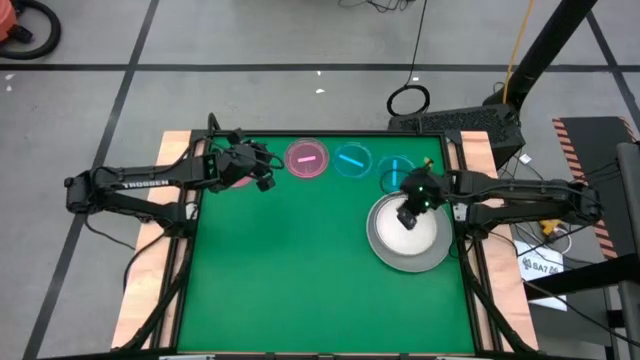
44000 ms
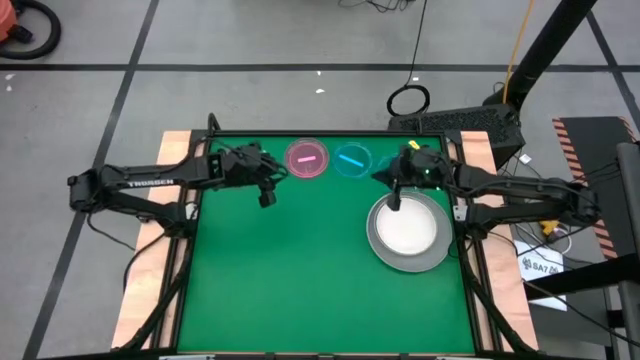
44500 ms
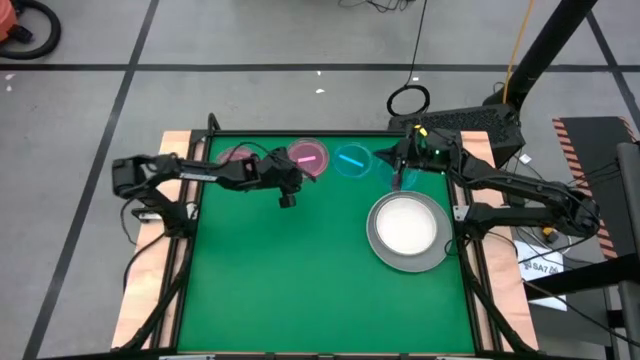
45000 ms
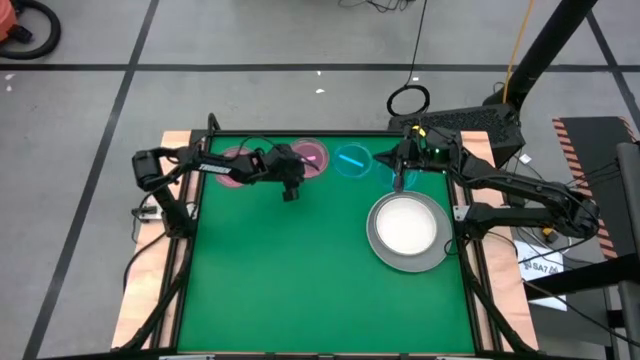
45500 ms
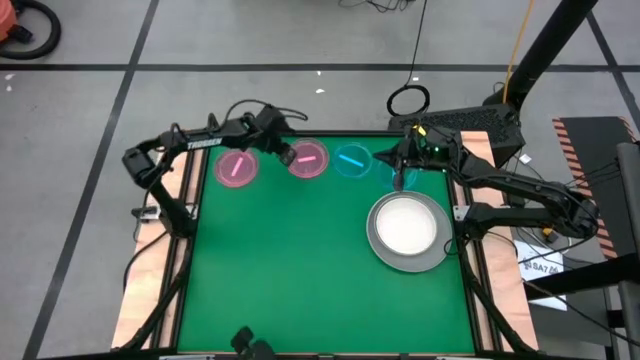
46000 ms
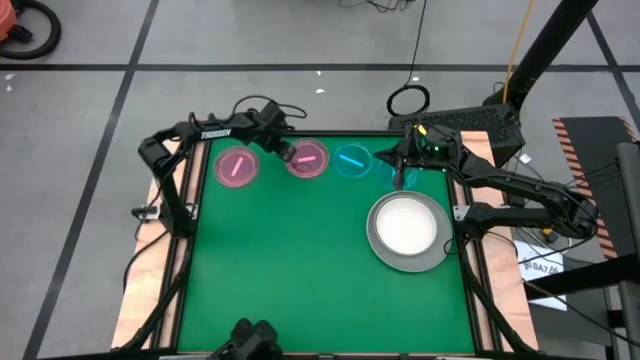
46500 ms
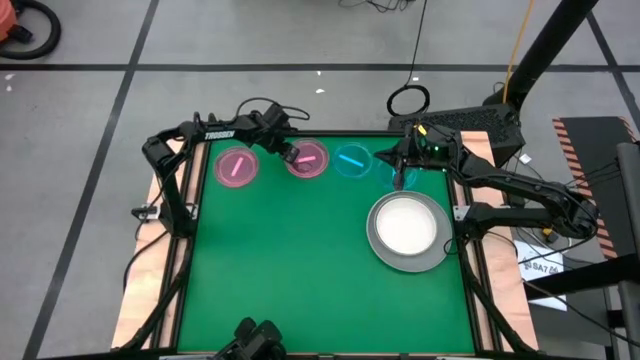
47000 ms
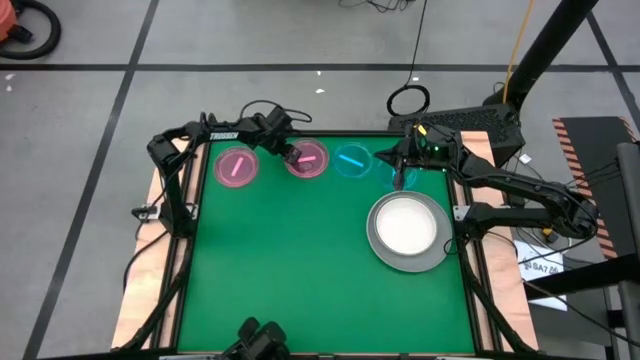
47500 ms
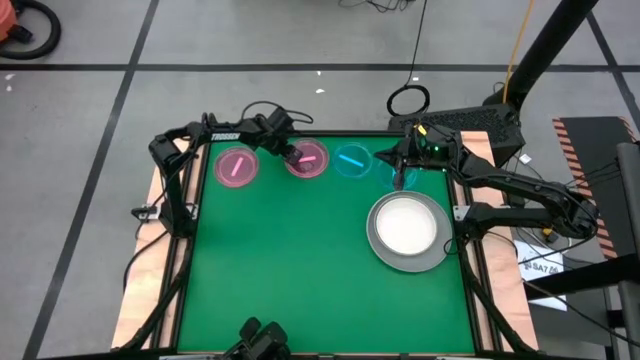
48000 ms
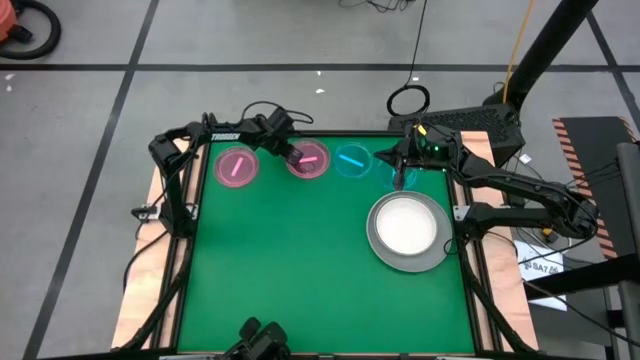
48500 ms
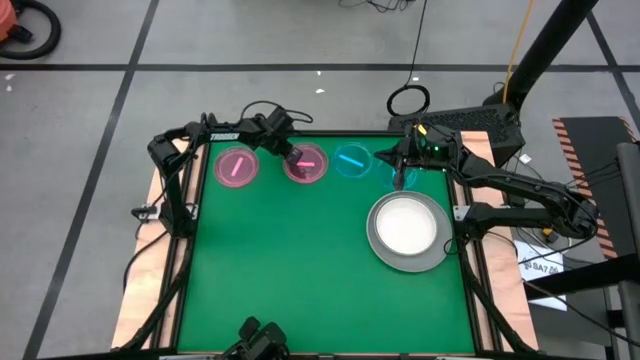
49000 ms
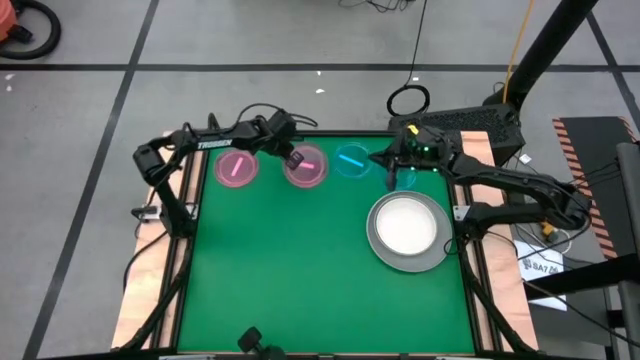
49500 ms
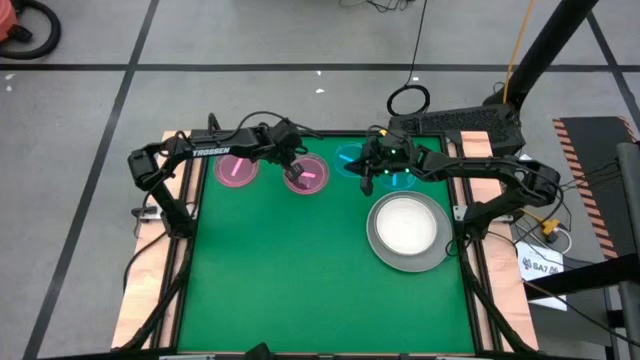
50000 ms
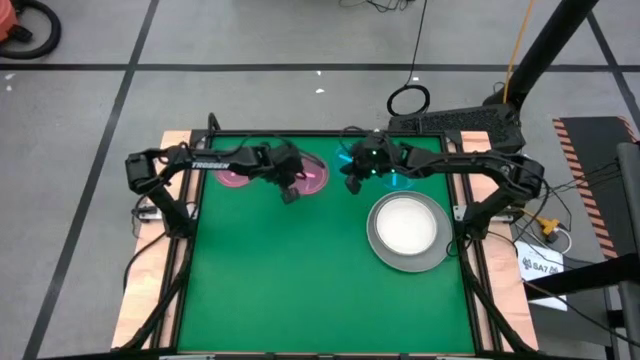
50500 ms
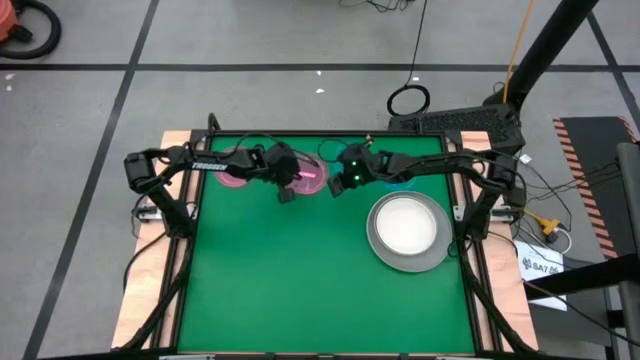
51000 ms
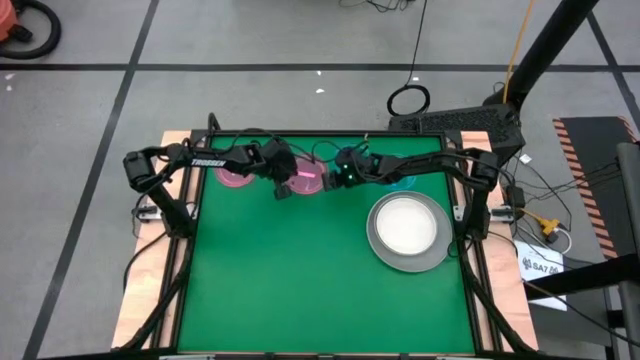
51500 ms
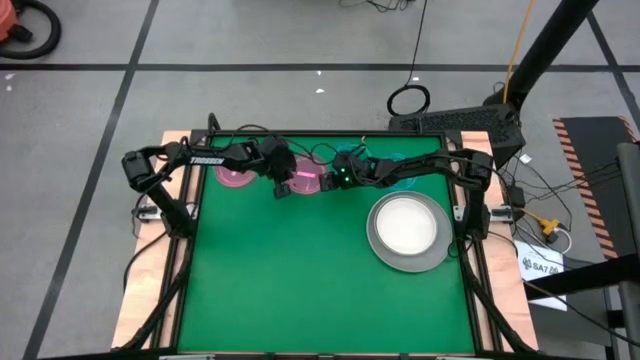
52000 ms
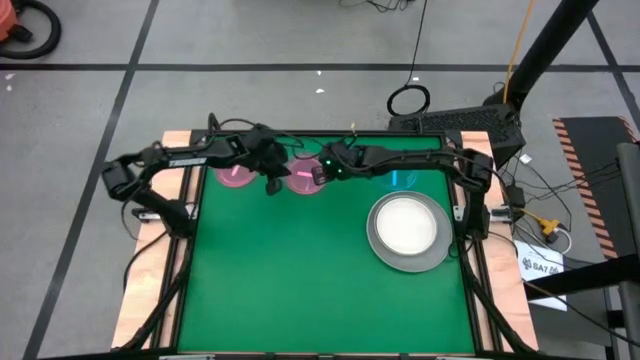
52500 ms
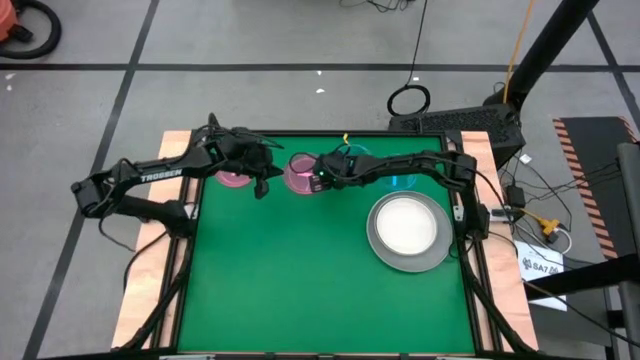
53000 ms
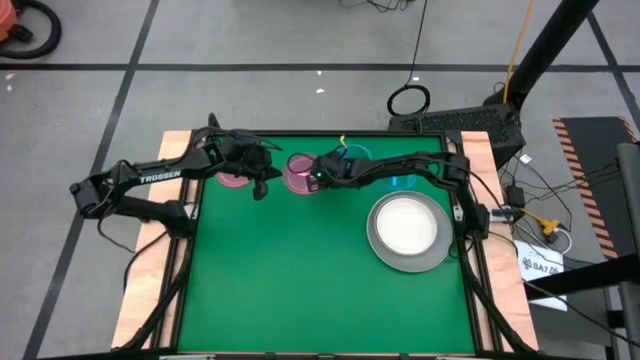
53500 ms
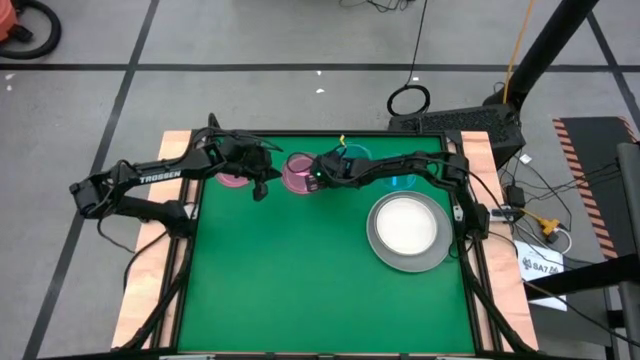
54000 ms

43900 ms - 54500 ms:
Task: Stack plastic plates
Stack the right pink plate on top of the white plate

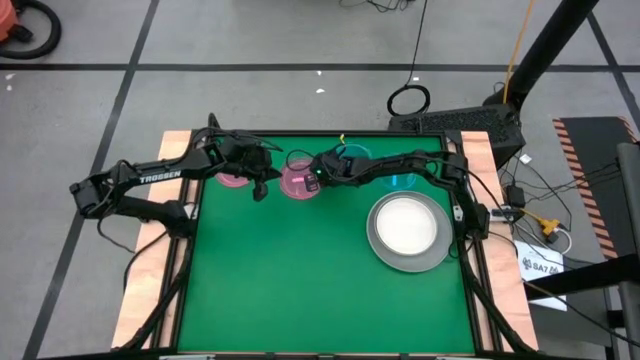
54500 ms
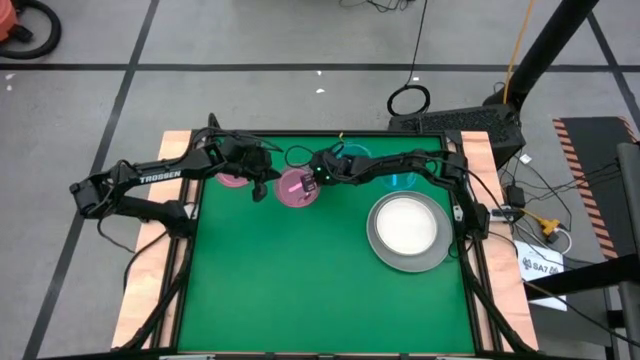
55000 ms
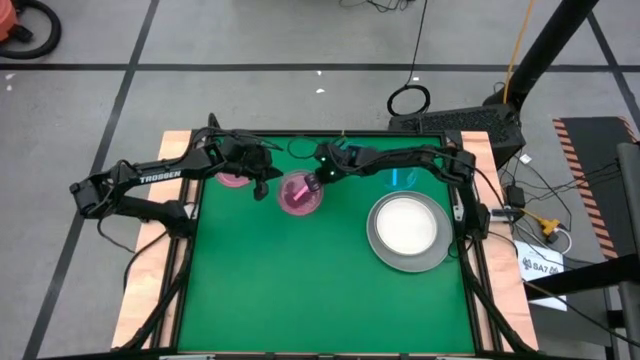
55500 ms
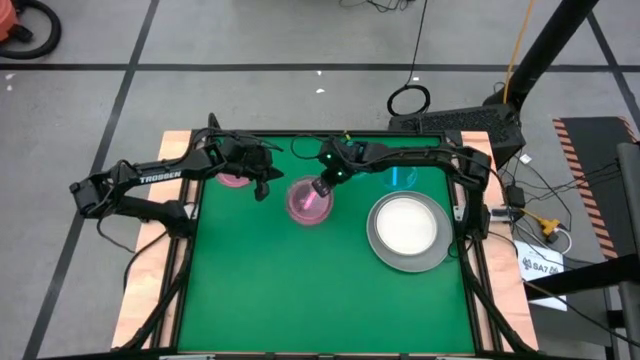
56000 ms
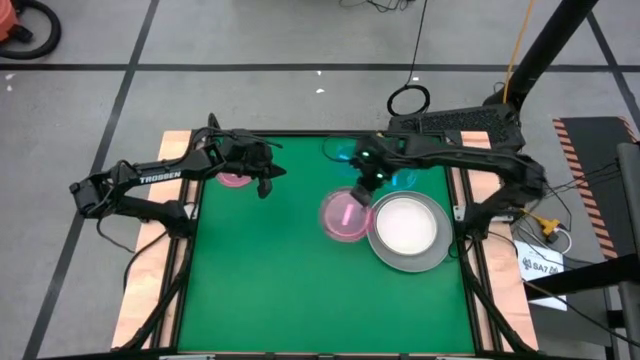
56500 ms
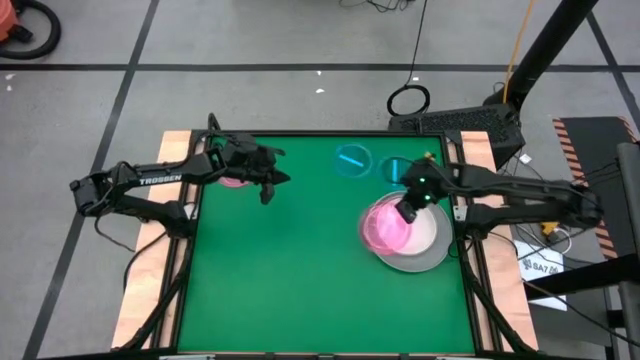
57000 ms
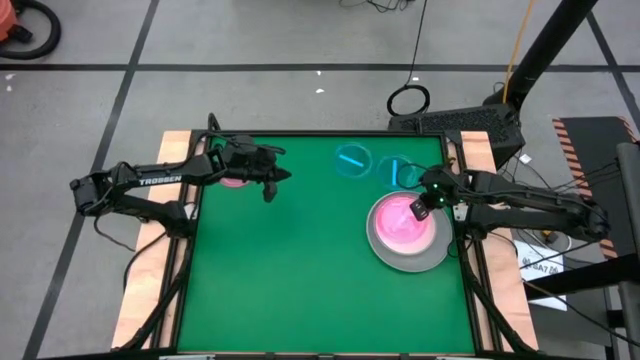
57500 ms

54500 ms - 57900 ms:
Stack the right pink plate on top of the white plate

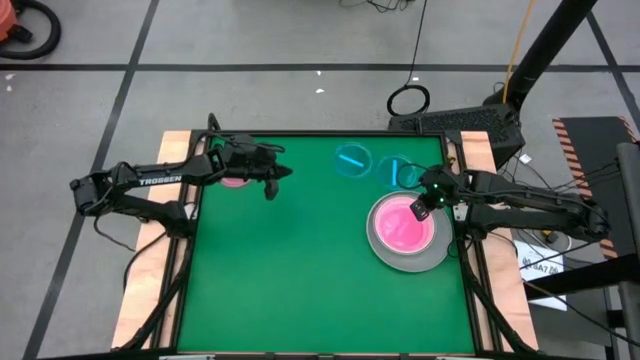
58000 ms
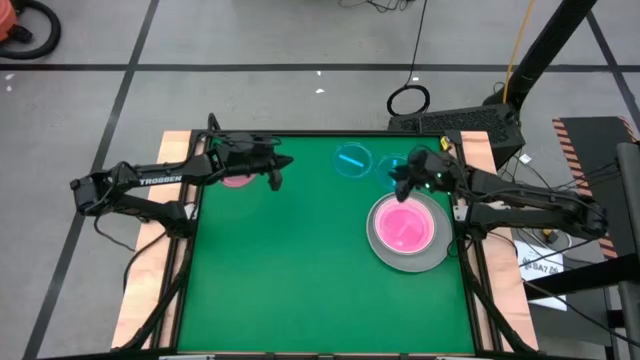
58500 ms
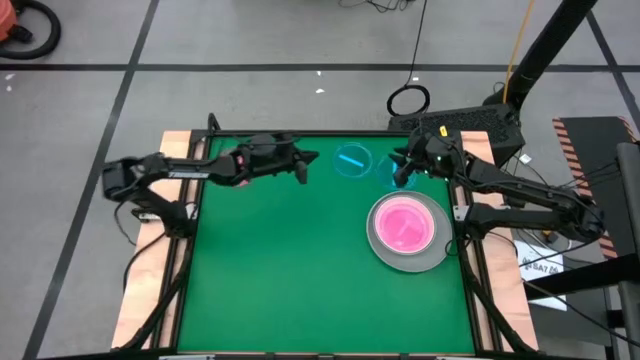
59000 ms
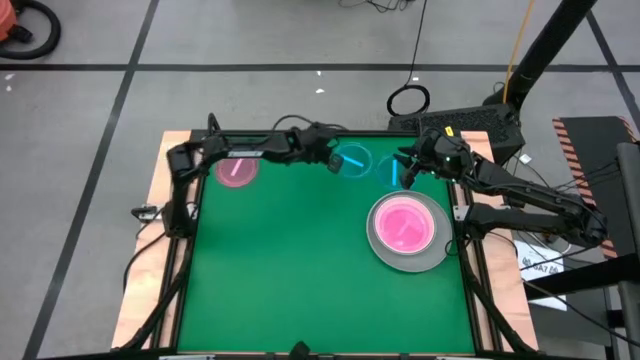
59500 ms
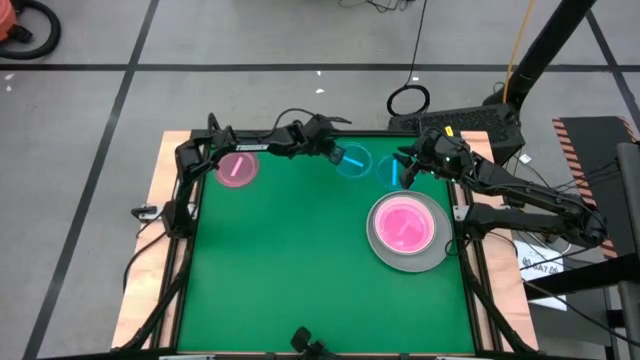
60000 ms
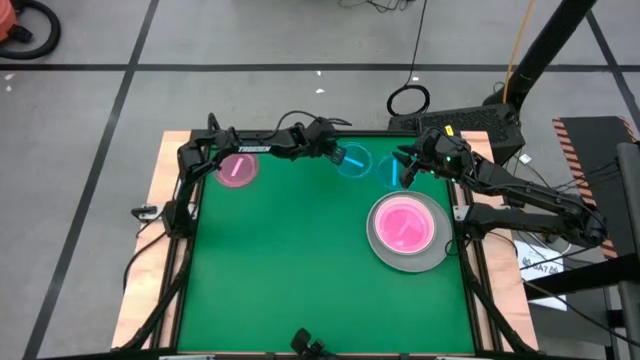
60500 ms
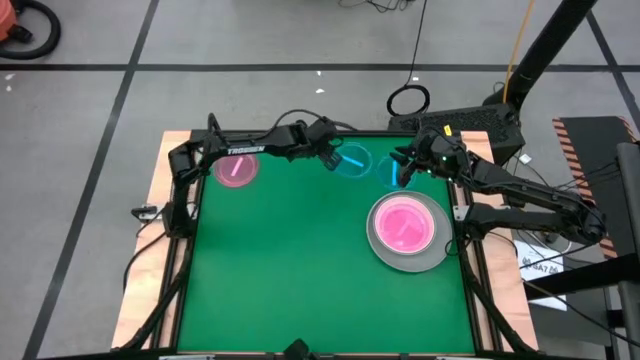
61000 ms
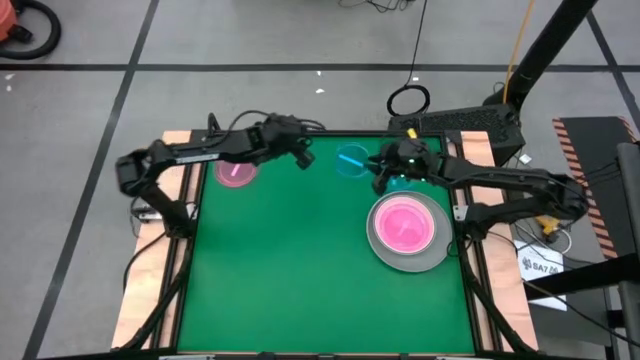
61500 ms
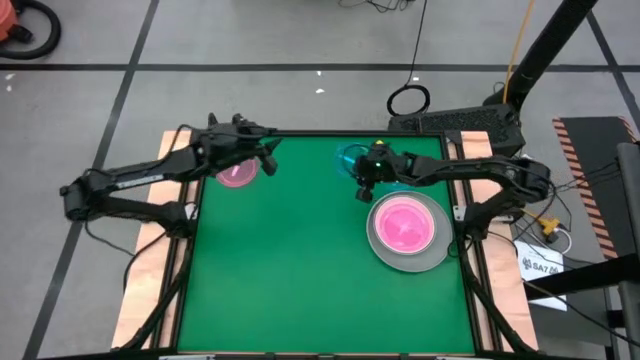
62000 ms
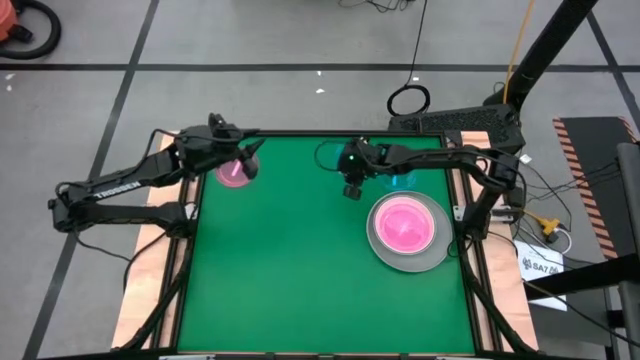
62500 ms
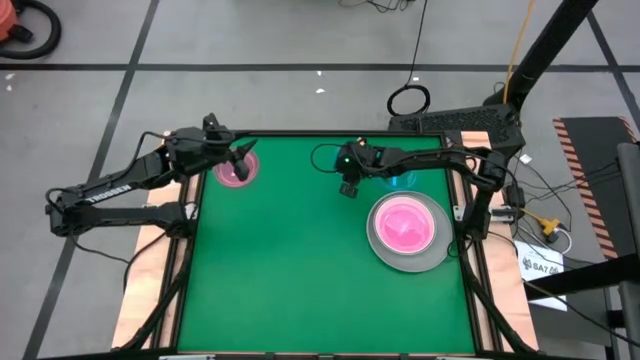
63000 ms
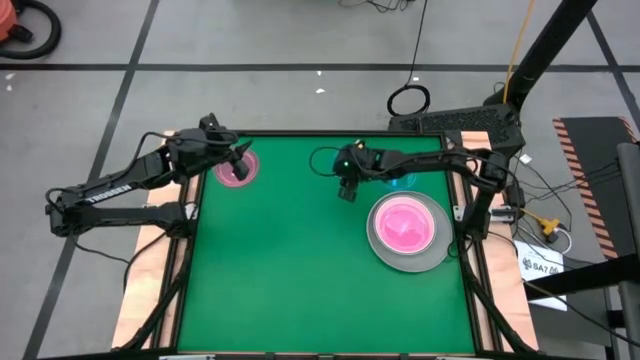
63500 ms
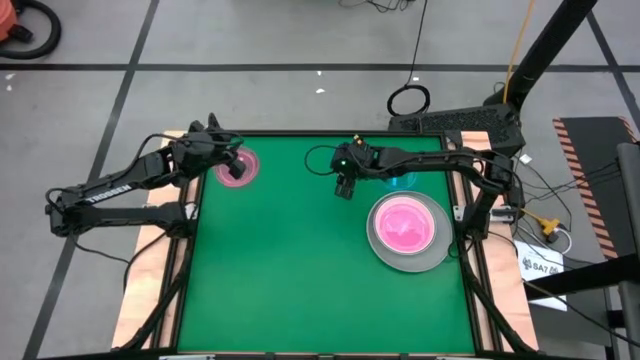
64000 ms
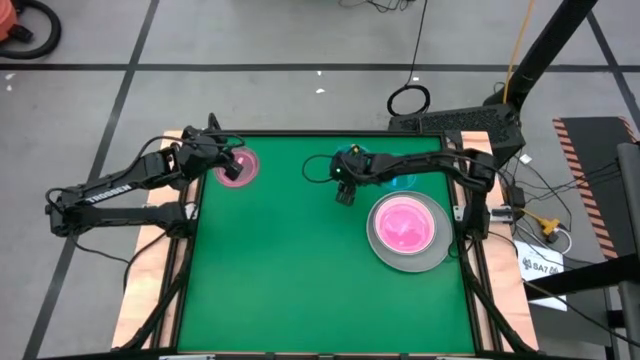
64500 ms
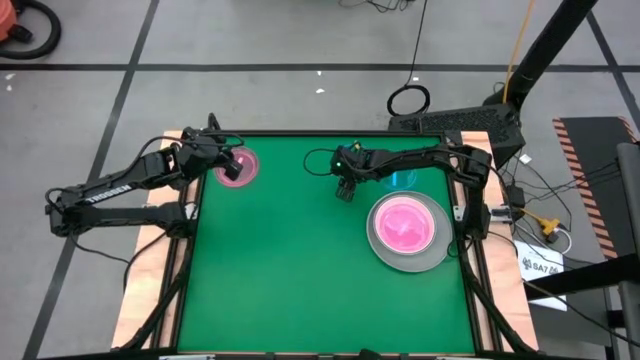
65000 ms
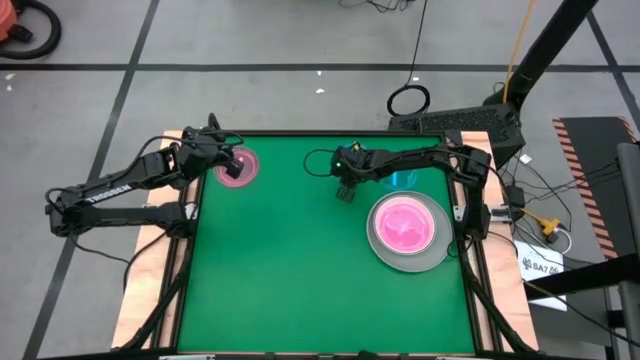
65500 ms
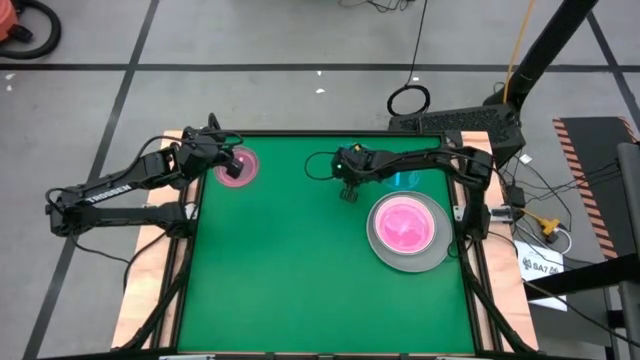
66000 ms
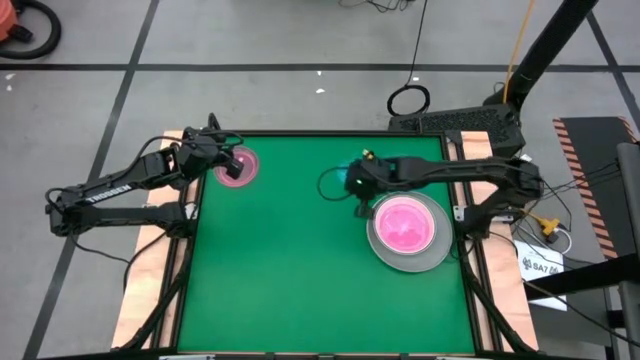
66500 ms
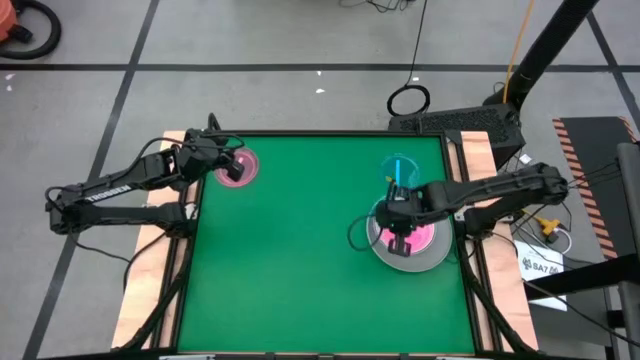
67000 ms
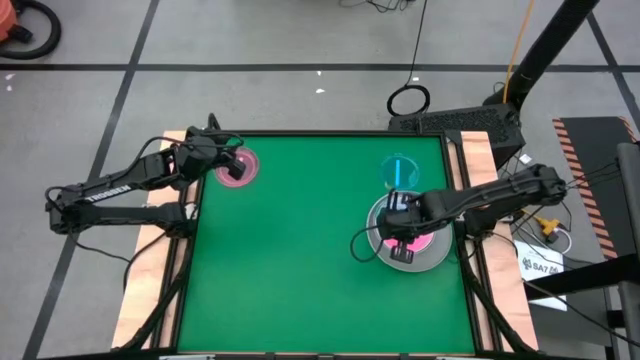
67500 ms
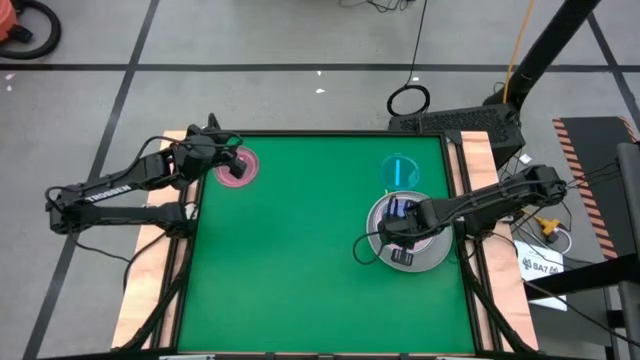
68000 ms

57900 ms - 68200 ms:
Stack the left blue plate on top of the pink plate
